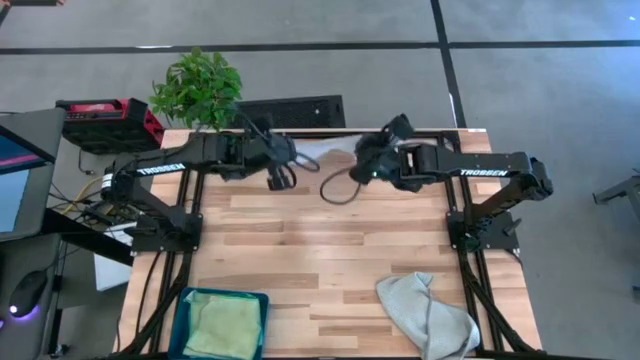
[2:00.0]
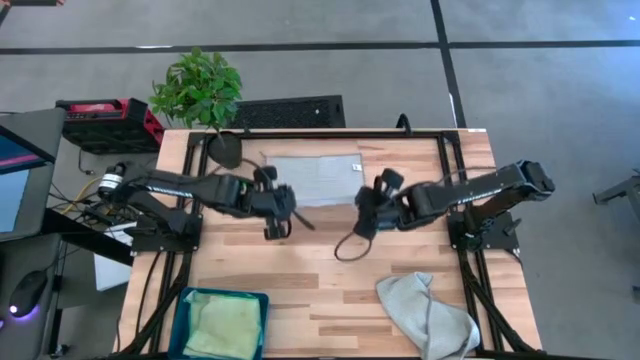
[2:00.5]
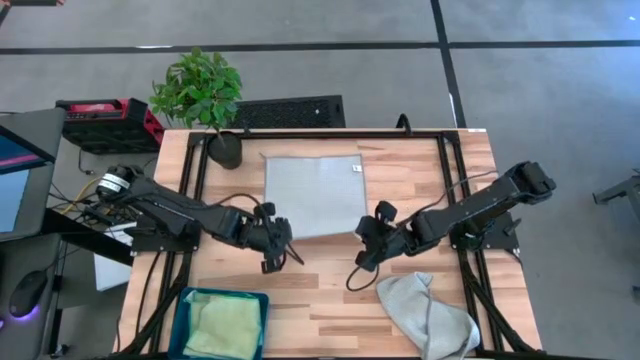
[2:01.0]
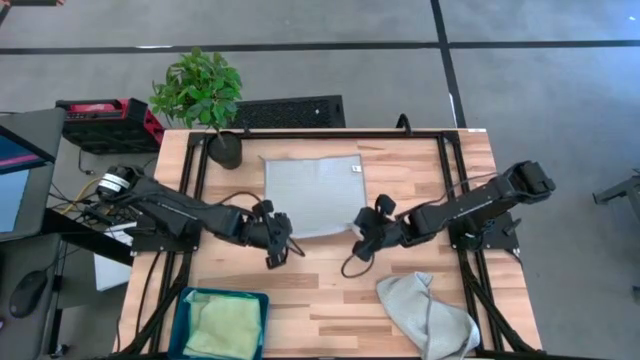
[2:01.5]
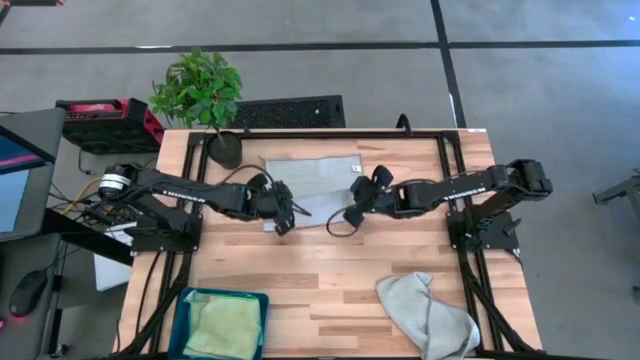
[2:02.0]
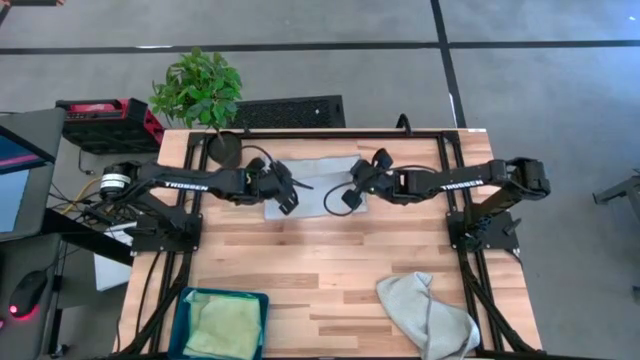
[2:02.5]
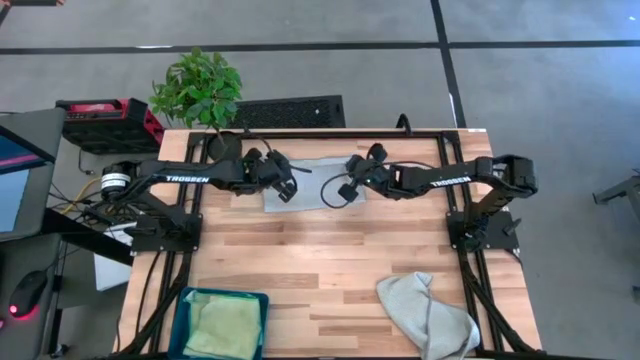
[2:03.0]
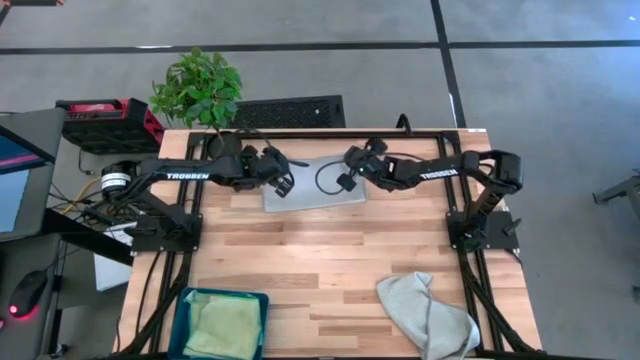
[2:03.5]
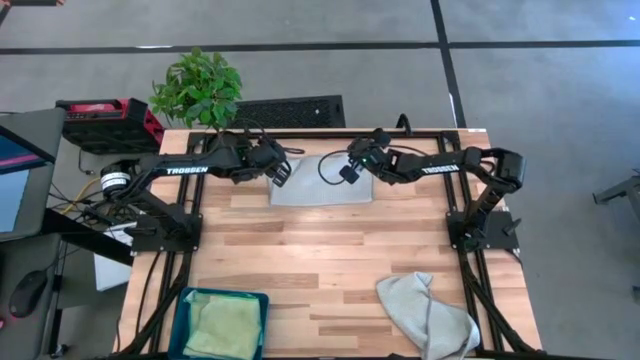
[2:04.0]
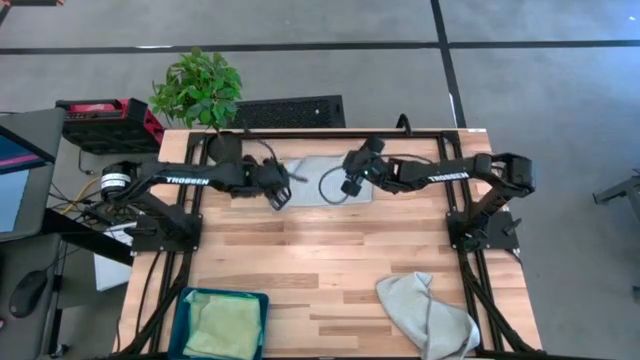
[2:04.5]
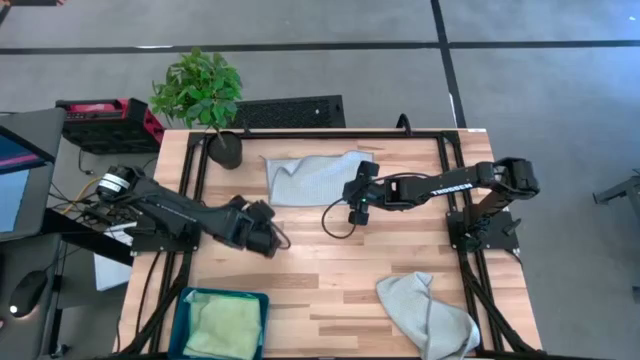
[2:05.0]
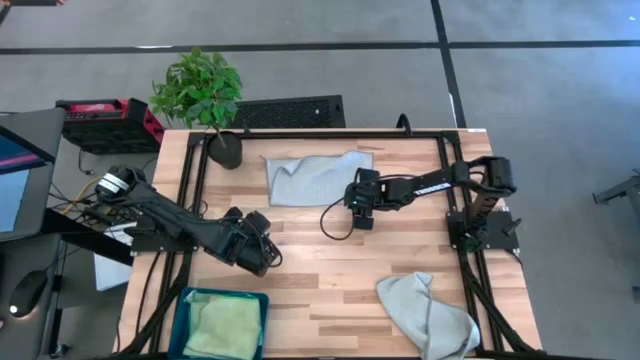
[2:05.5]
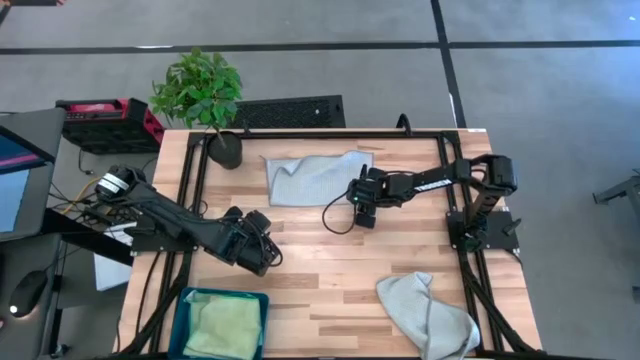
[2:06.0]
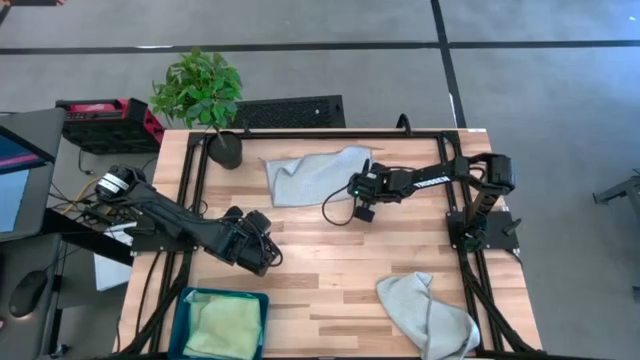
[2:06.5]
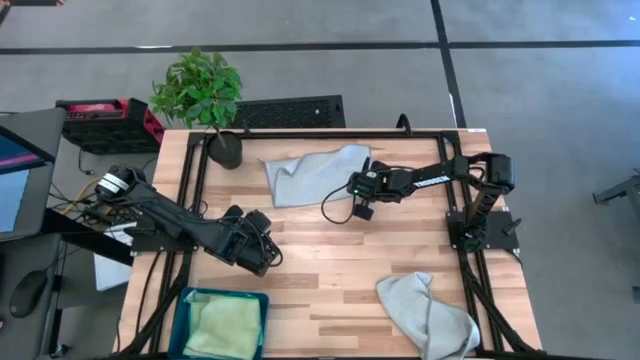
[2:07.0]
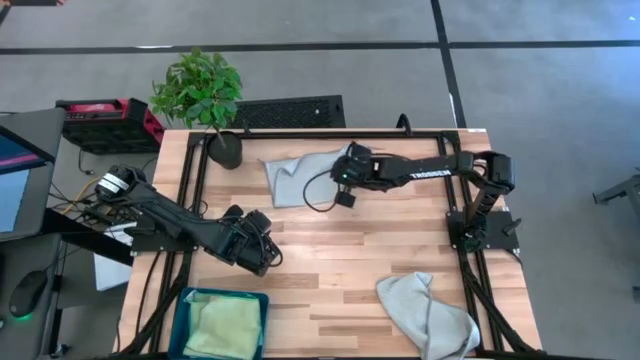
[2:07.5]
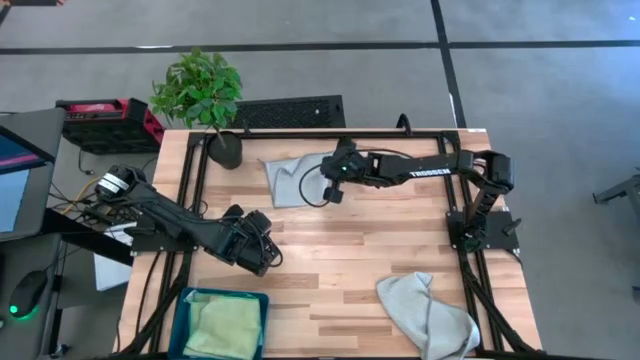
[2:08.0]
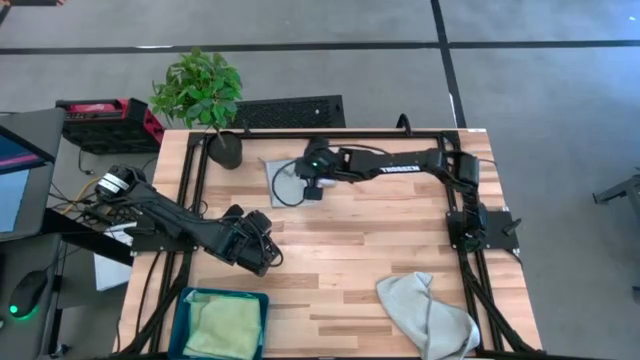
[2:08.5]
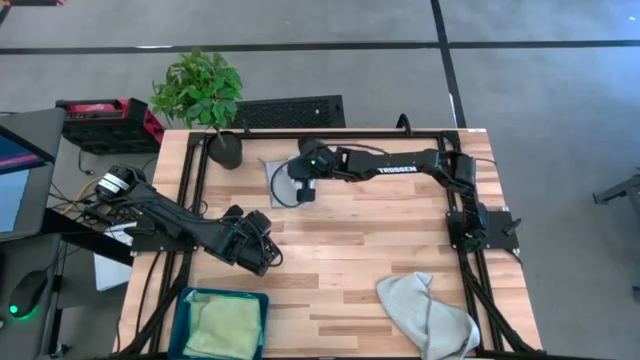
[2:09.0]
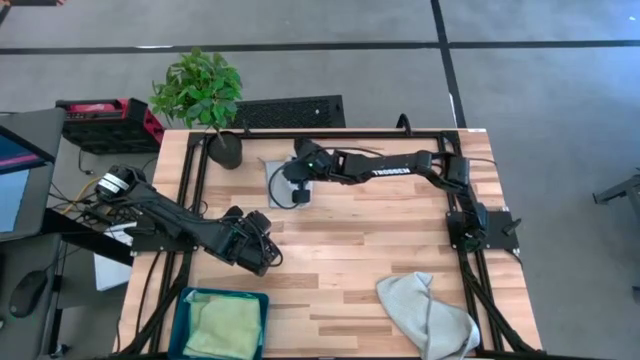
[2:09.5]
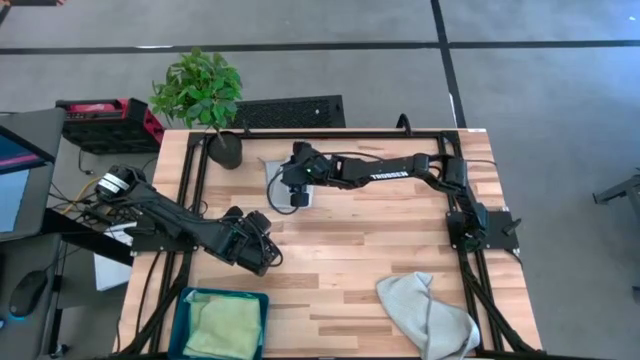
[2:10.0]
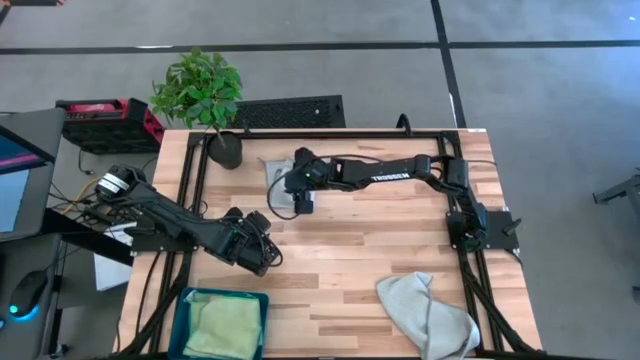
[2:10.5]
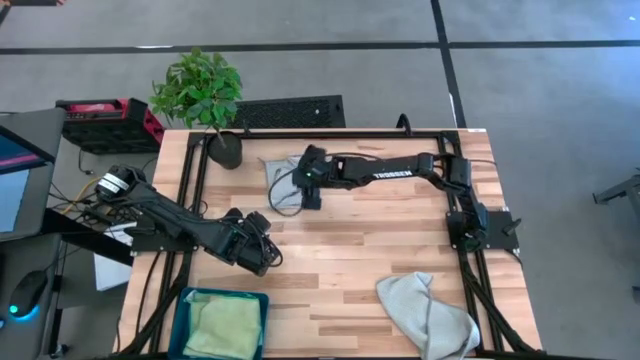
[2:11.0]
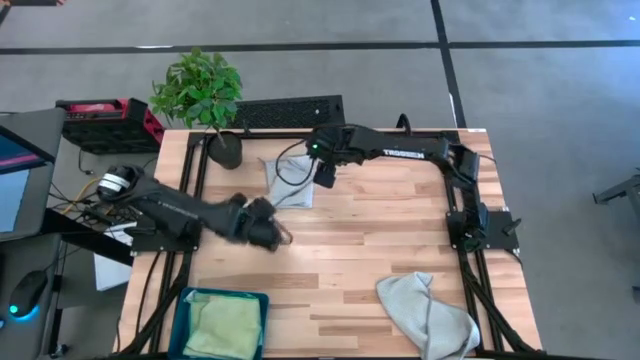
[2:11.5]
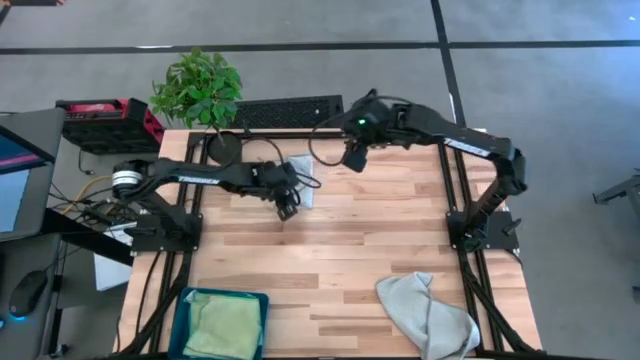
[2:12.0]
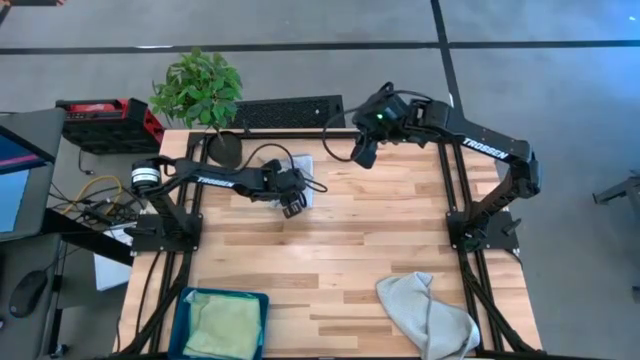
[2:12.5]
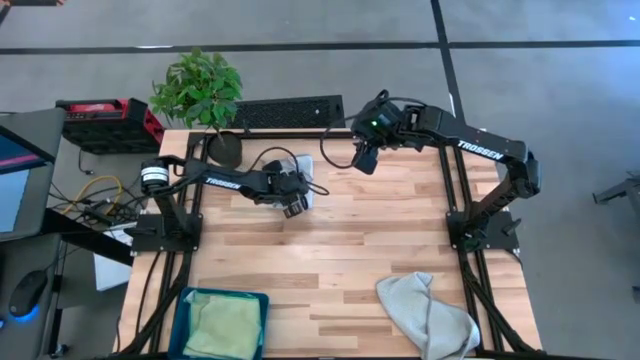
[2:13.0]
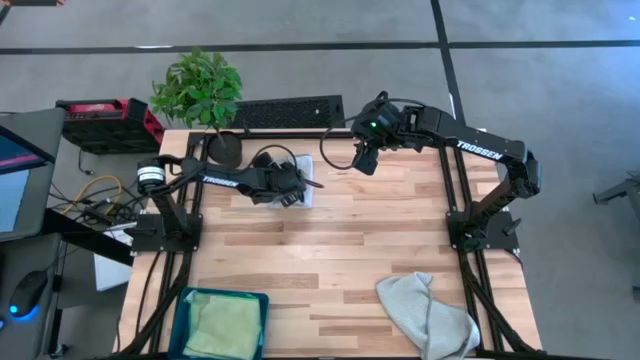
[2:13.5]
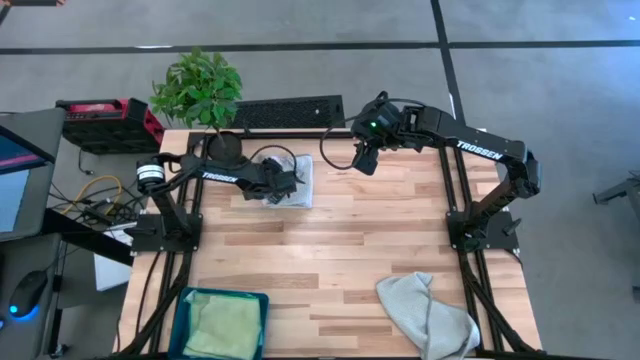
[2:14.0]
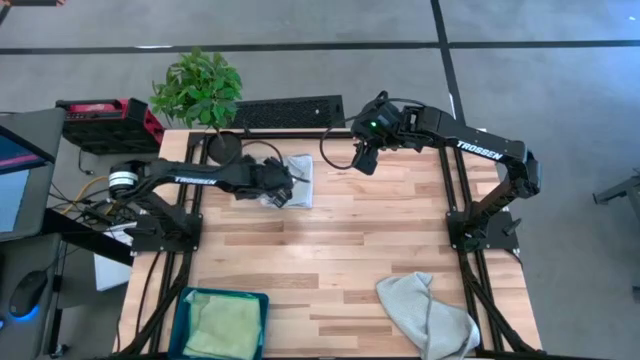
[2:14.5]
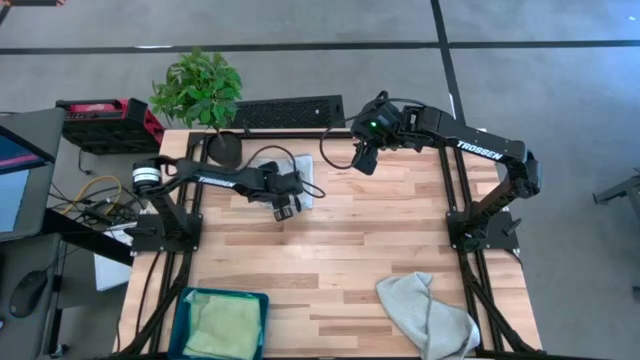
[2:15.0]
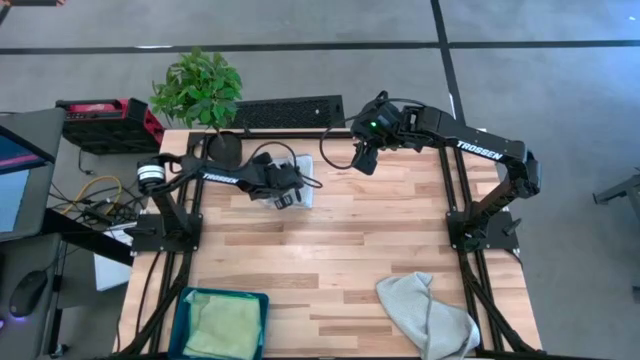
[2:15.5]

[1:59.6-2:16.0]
Task: Fold microfiber towels
Fold the top grey microfiber cloth

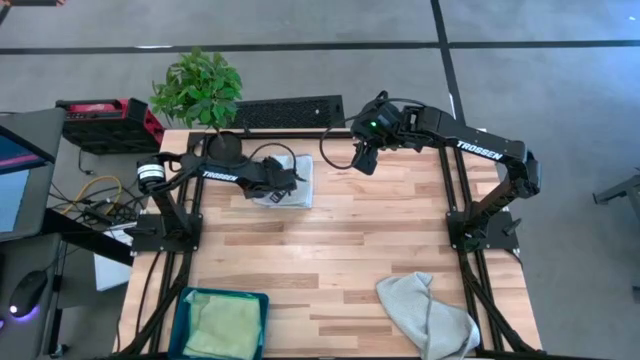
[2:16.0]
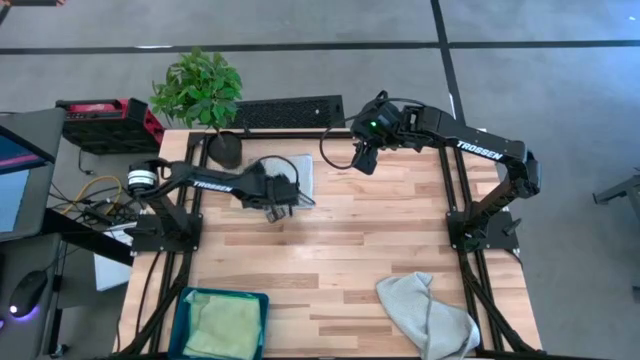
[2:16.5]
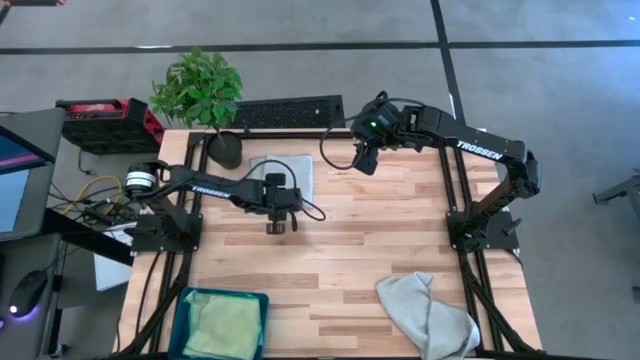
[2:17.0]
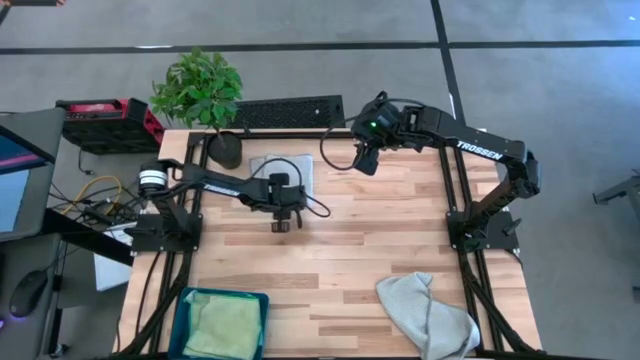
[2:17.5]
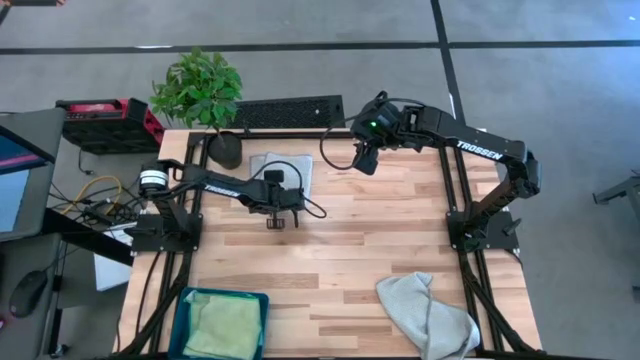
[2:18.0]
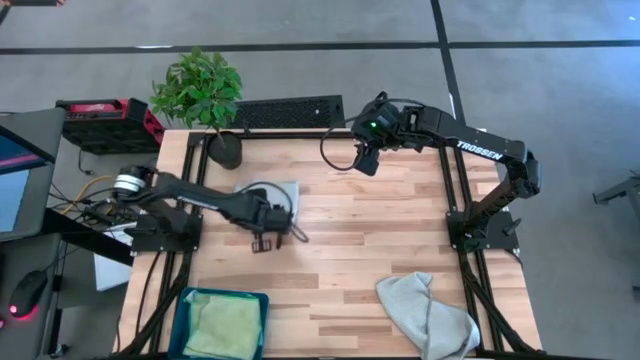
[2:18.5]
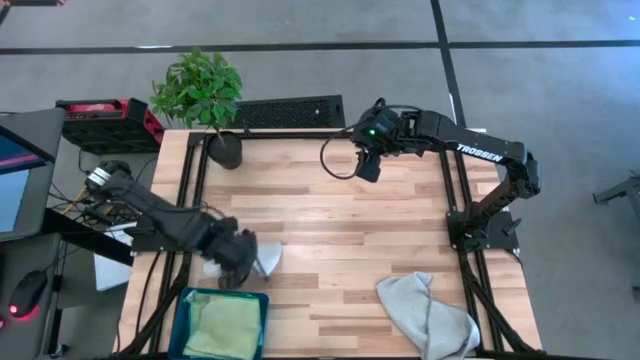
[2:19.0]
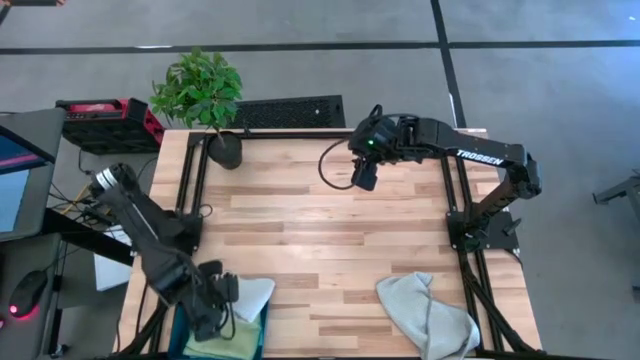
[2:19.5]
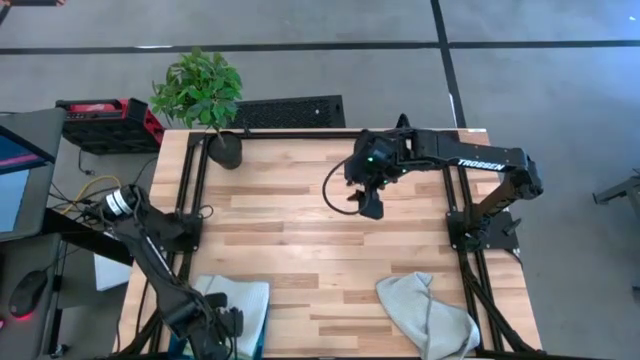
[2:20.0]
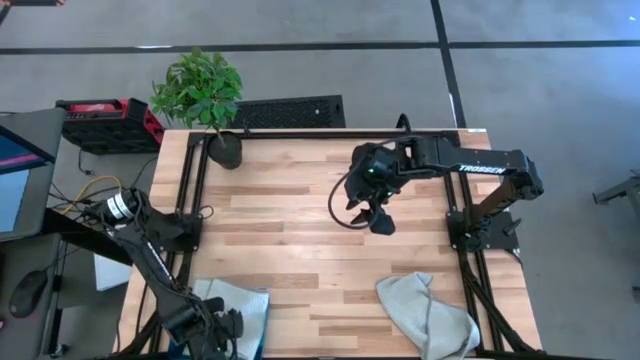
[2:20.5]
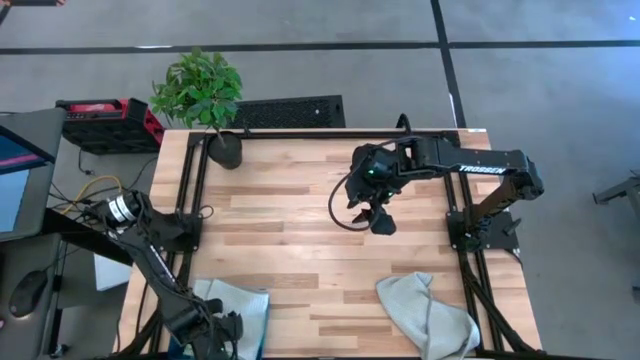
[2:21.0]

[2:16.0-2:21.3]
Stack the top grey microfiber cloth on top of the green microfiber cloth into the bin

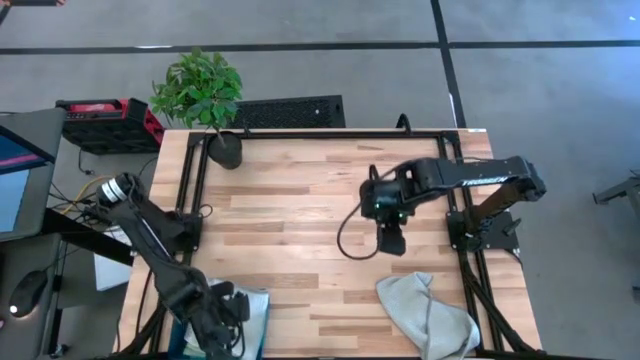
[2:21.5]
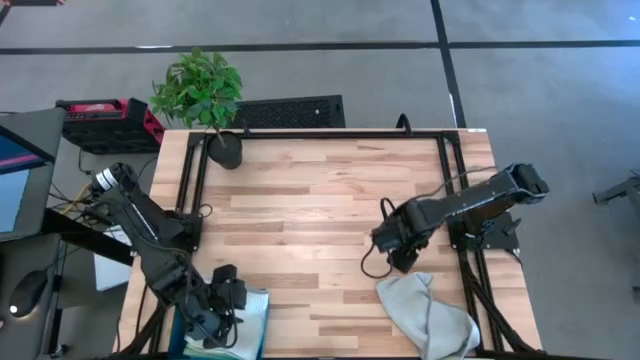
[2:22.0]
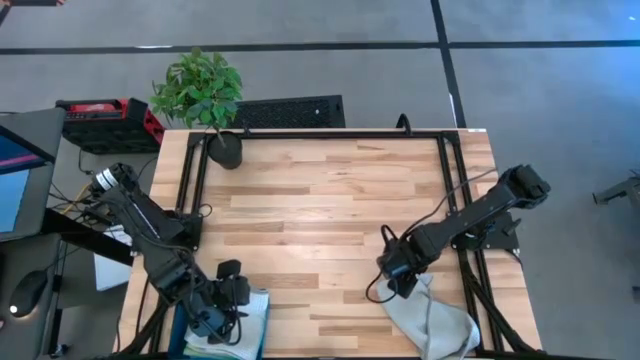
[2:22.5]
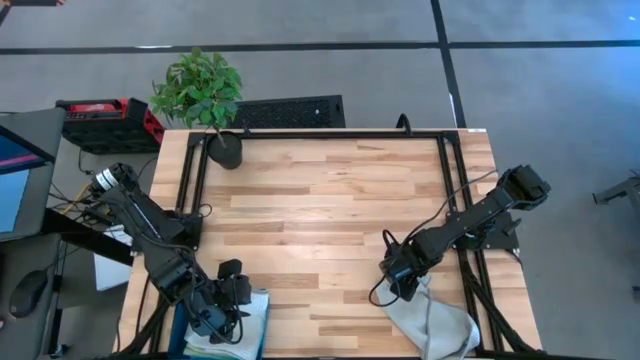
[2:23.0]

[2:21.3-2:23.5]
Fold the grey microfiber cloth
